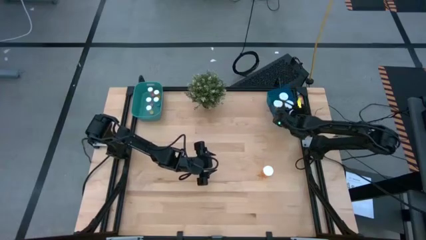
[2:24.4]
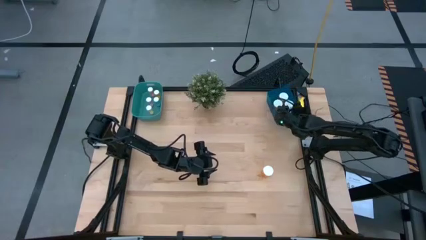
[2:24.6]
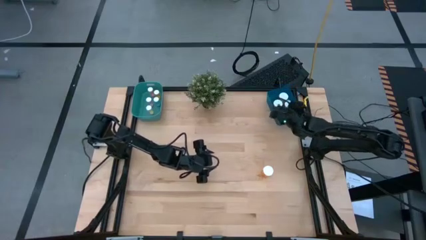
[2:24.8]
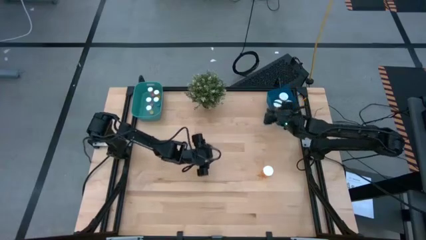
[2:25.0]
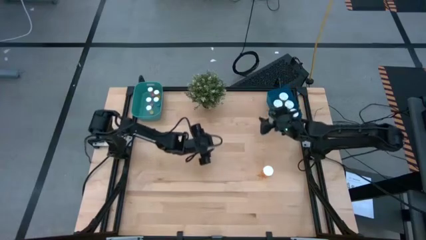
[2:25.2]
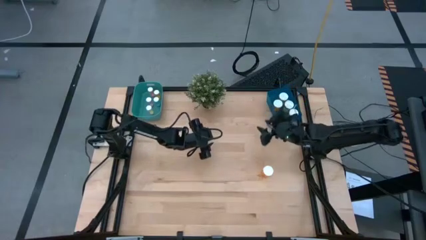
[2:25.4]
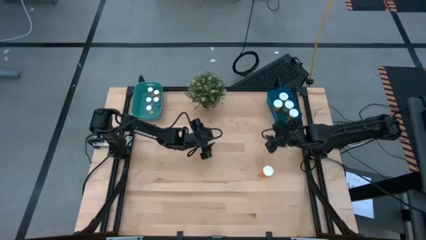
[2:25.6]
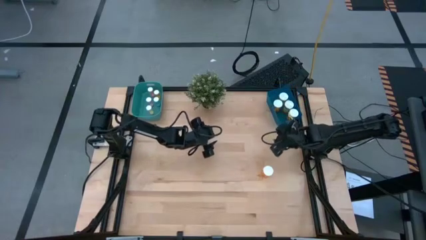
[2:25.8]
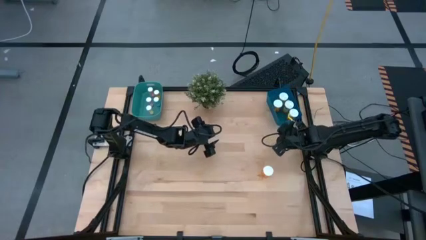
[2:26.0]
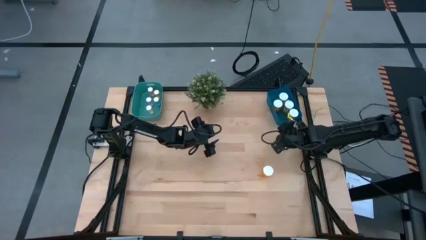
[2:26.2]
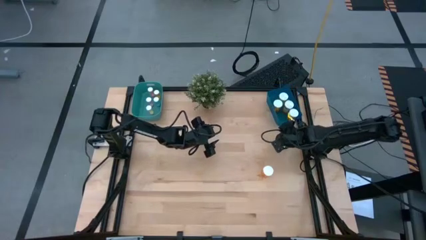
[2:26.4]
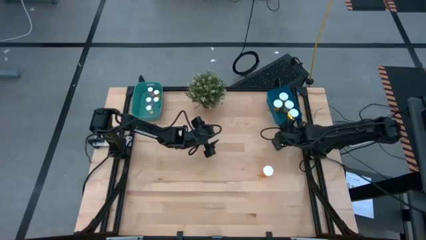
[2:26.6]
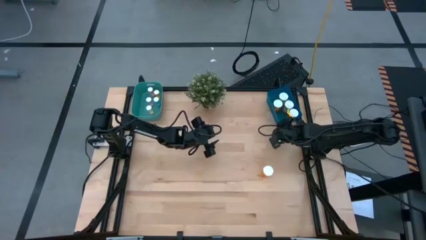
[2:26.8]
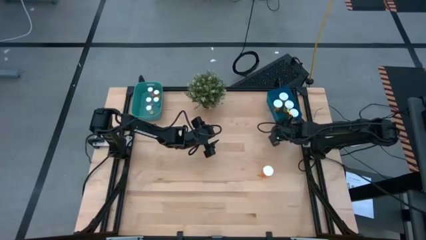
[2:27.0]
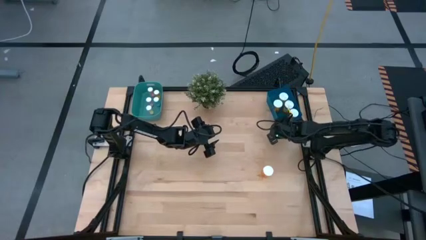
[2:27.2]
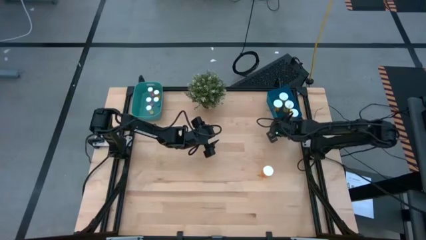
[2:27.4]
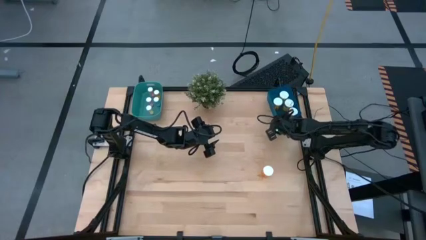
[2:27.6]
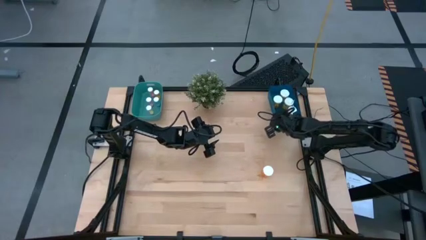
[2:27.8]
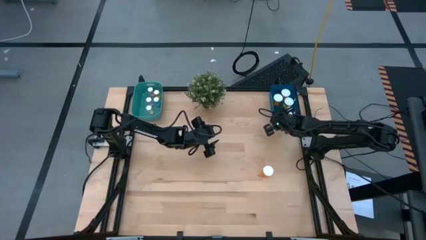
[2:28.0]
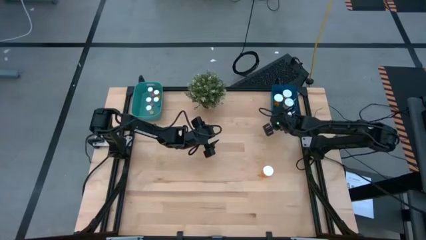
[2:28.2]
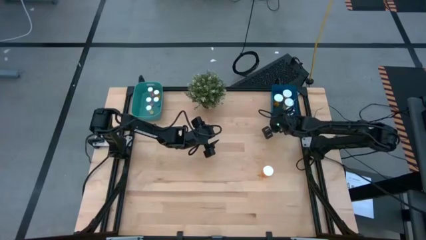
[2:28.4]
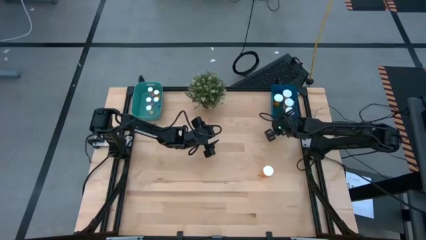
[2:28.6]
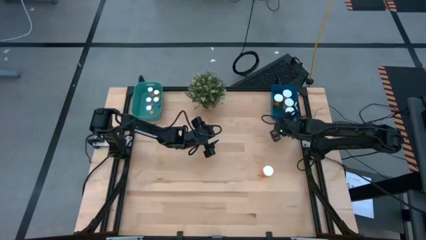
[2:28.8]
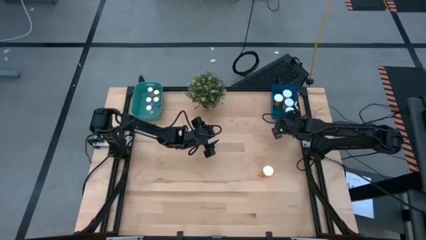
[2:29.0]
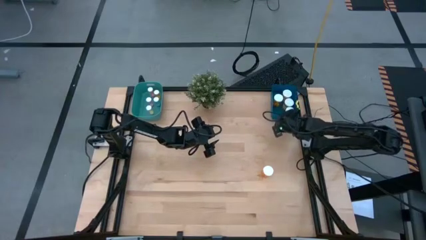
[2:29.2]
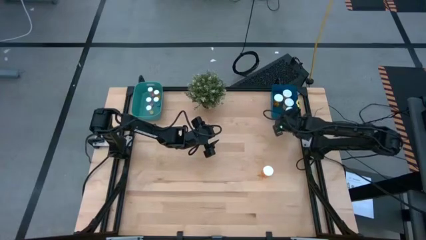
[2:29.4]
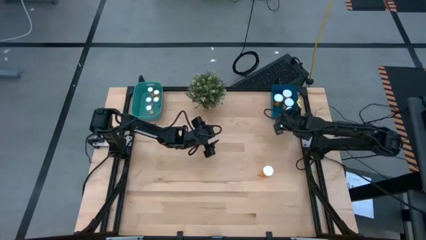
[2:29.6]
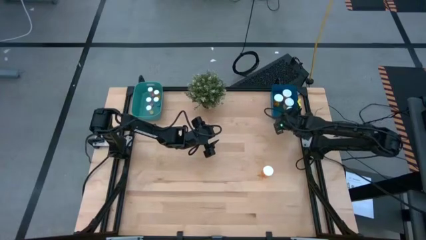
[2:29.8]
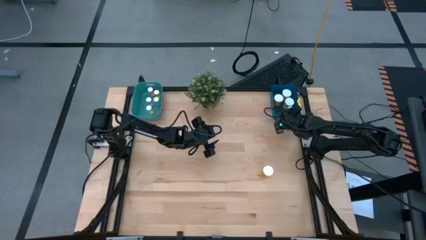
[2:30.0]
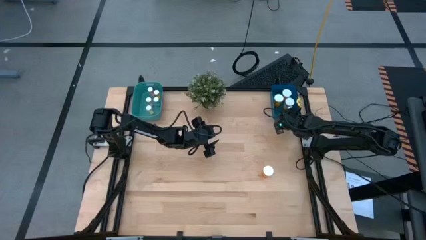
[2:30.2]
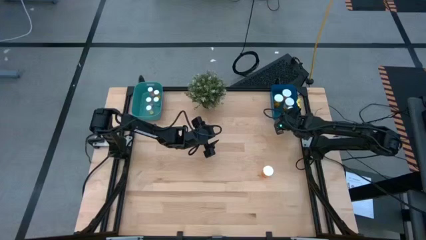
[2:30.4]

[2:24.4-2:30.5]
Task: Pick and place medicine bottles into bin by pill shape (circle, oval)
Adjust the blue bin

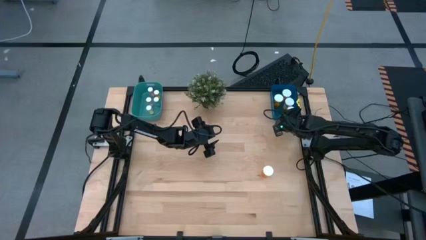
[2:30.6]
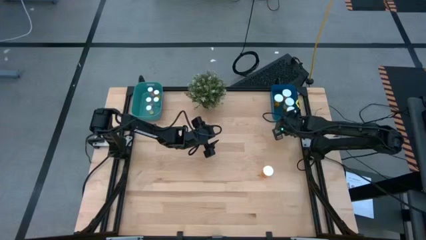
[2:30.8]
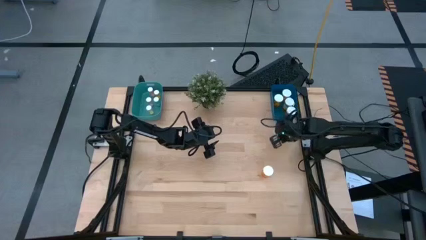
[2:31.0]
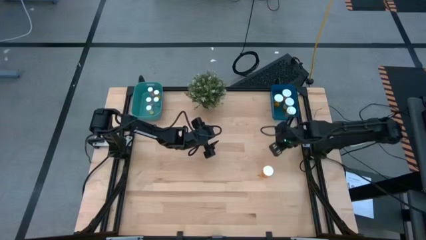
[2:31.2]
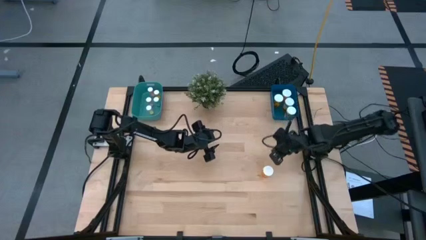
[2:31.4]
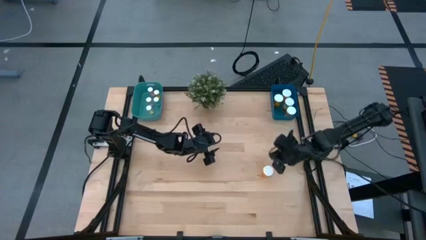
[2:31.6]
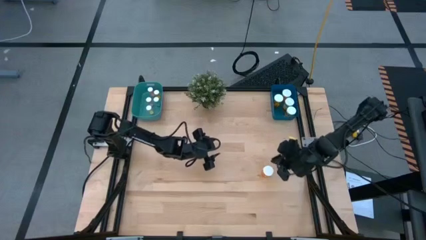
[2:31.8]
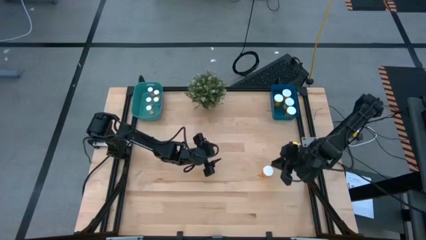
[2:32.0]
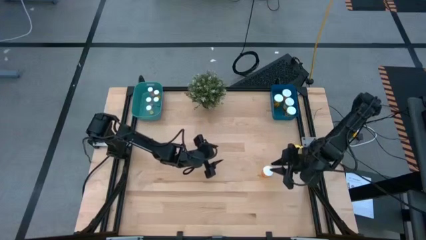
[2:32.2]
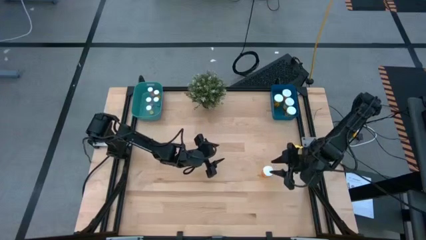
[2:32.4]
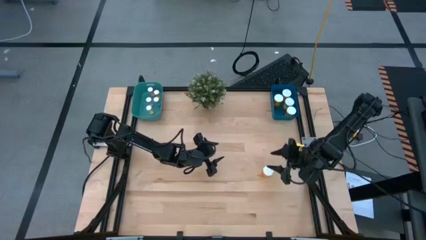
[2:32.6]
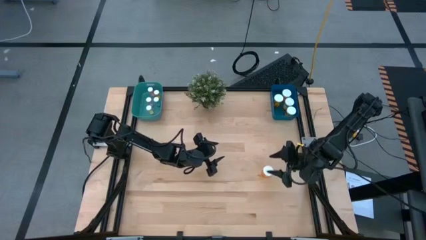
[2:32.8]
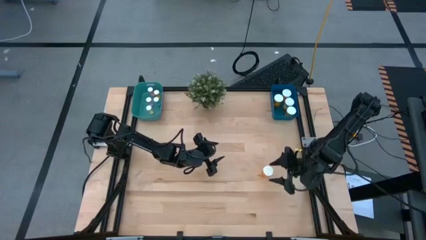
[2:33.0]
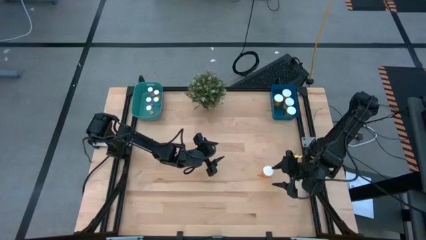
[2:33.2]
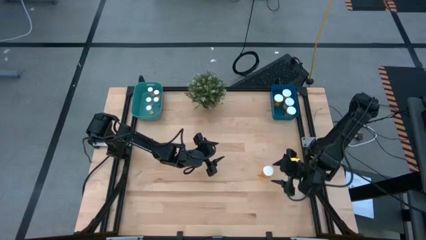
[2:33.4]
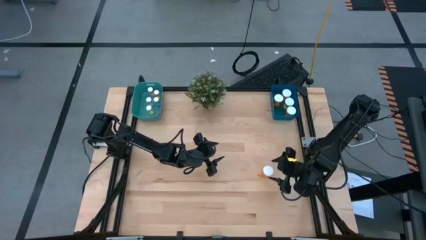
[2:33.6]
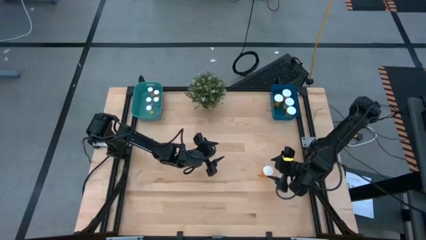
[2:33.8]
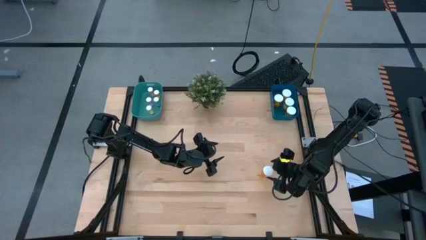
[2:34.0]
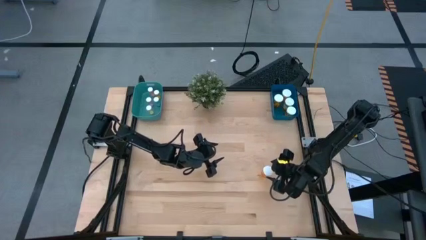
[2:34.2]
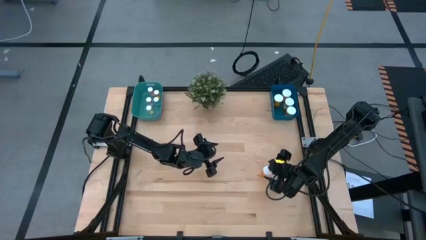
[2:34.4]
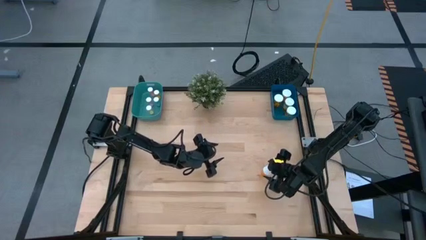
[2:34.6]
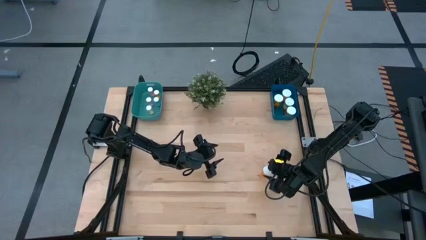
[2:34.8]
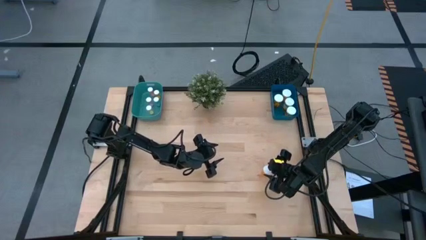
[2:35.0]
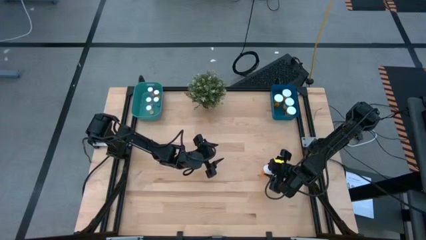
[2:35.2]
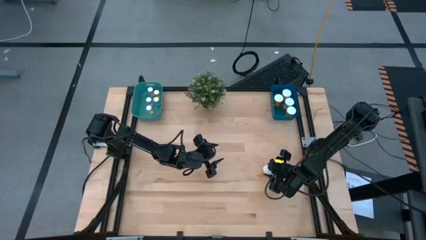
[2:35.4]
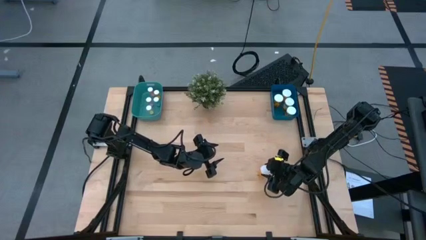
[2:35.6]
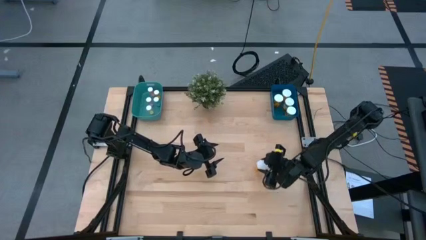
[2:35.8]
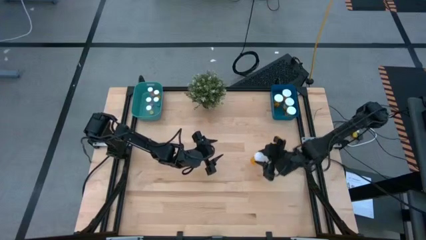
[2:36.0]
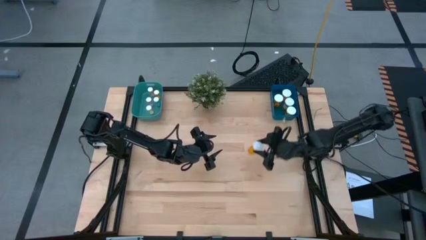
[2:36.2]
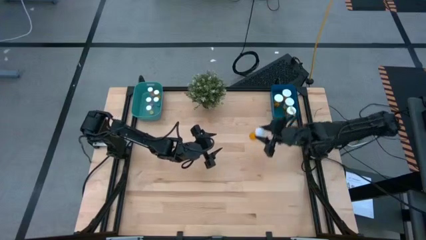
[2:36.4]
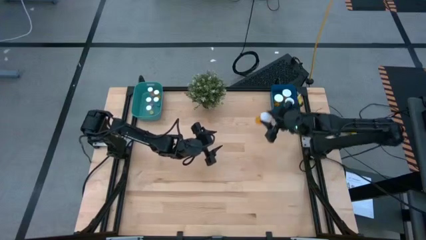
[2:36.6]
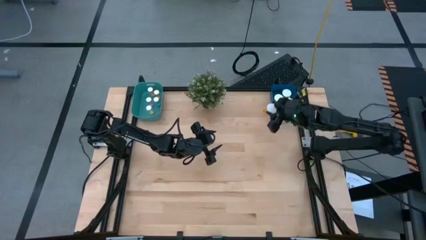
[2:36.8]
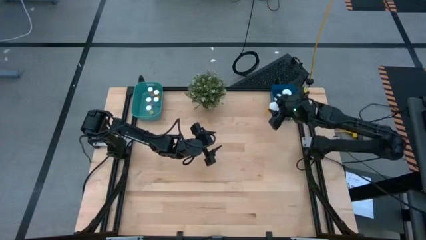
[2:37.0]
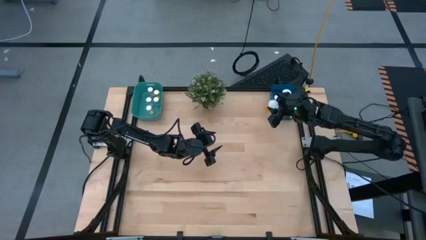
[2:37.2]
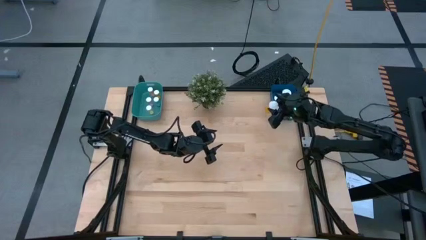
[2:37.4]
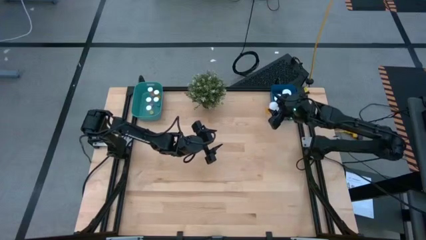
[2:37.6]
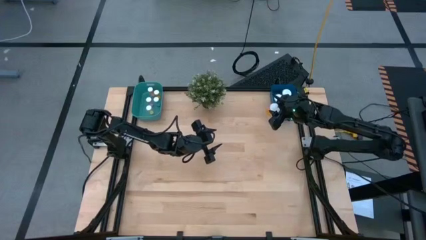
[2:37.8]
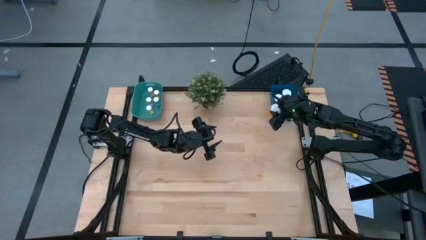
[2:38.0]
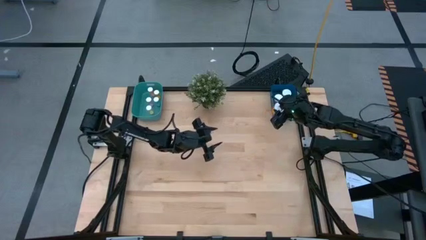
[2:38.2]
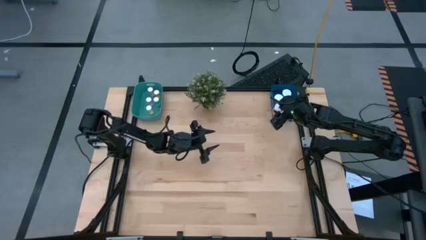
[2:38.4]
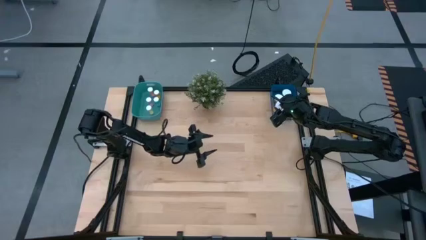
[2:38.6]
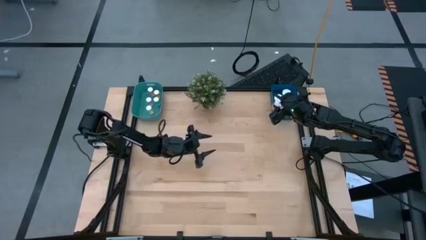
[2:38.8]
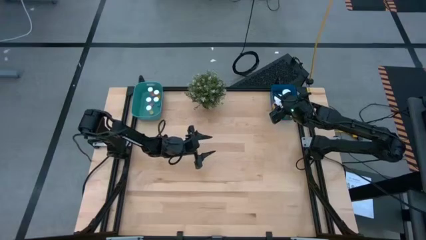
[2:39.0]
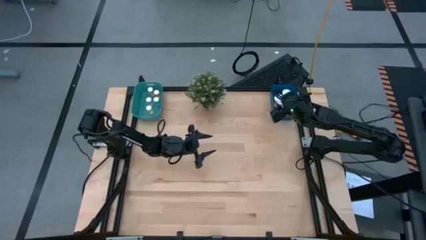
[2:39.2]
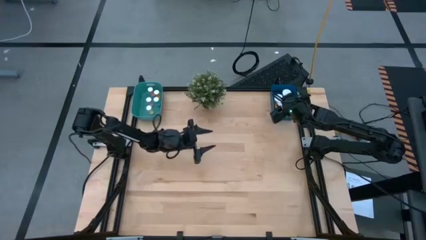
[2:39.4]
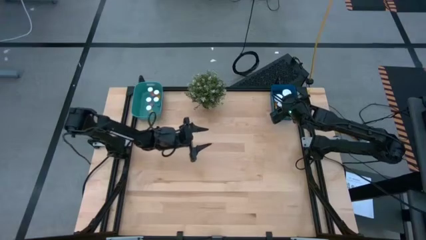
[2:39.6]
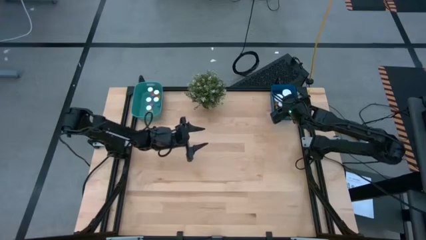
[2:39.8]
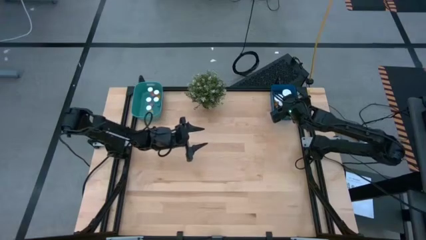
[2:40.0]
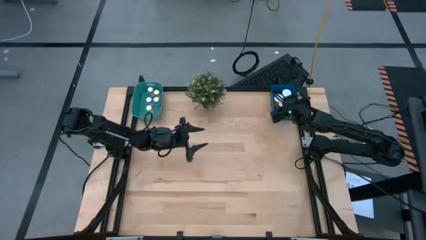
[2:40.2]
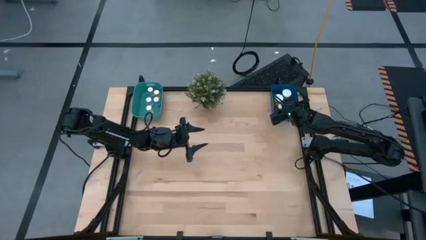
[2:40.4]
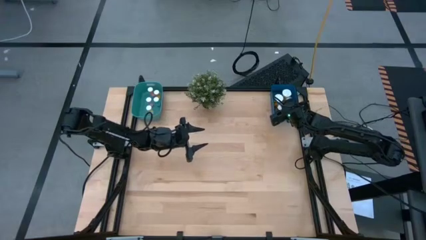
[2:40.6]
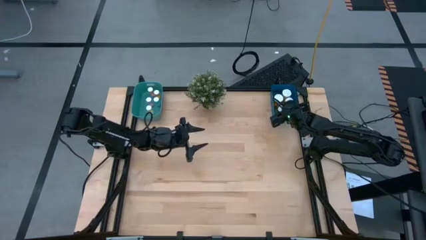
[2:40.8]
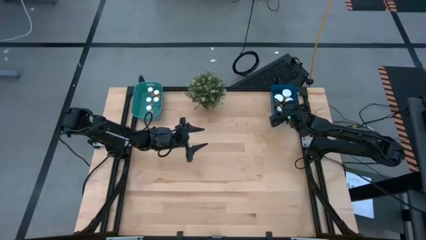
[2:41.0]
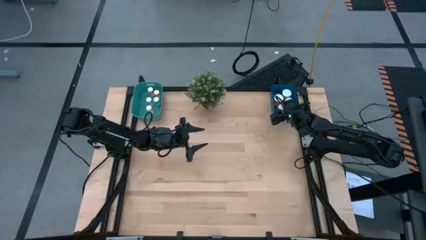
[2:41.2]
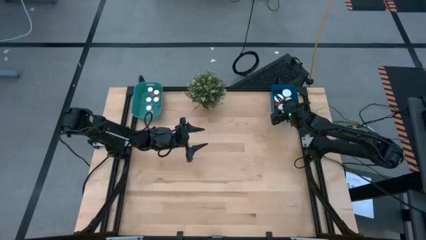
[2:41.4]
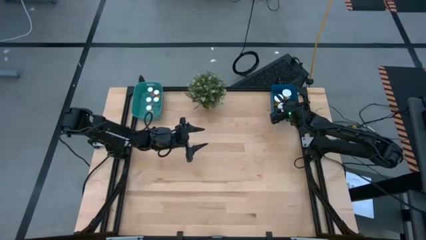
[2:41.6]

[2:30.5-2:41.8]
Put the big orange pill bottle into the blue bin
